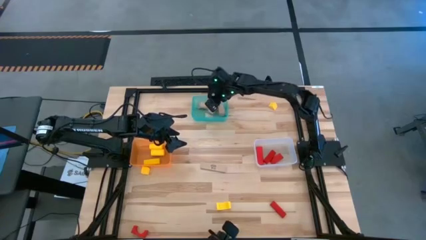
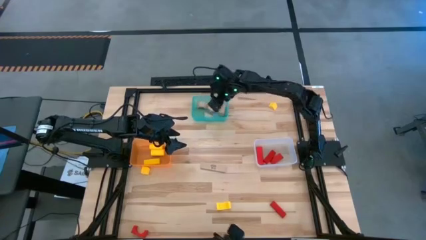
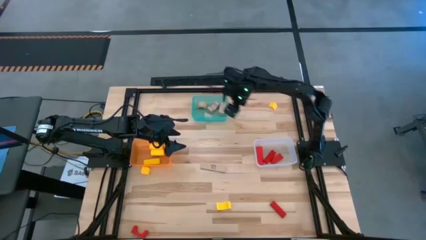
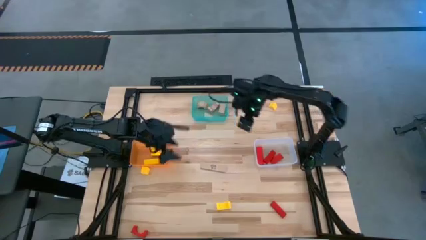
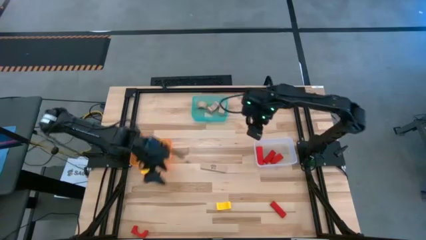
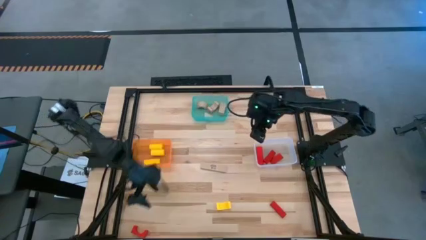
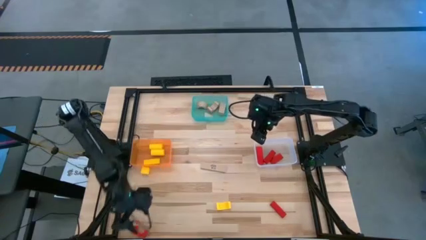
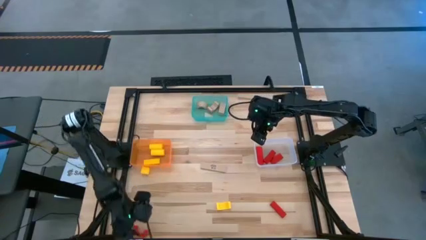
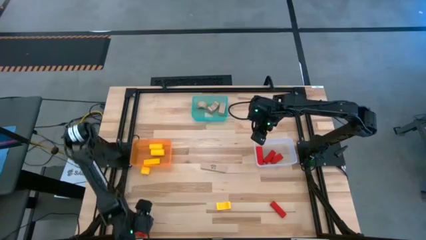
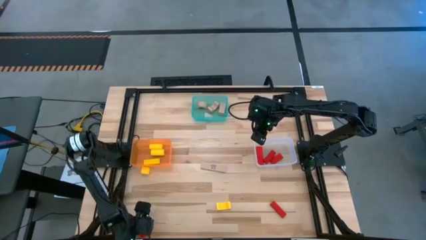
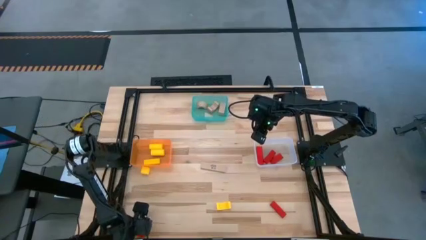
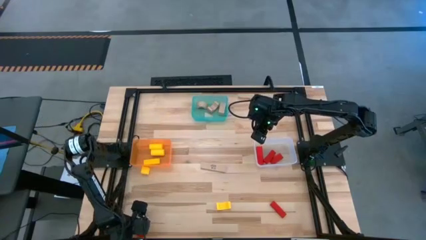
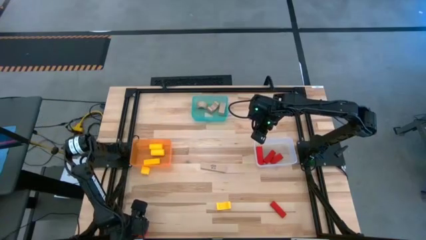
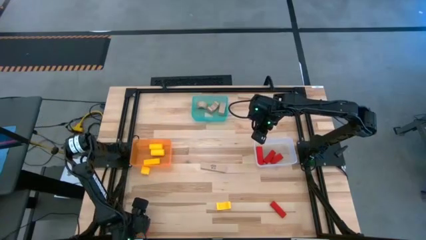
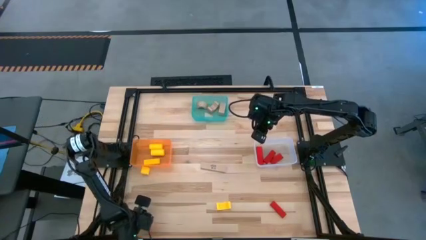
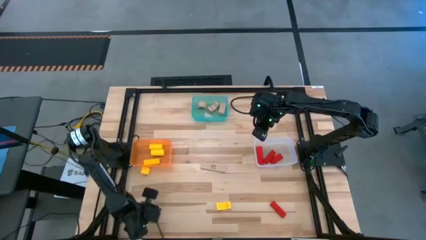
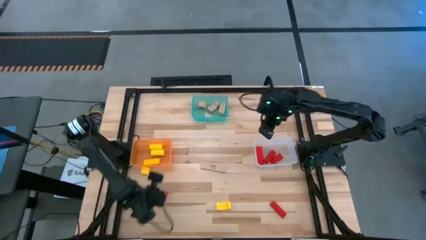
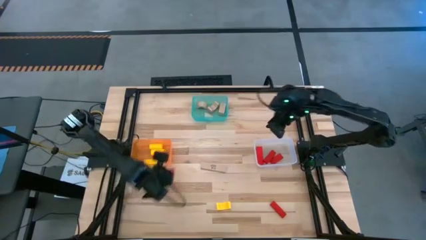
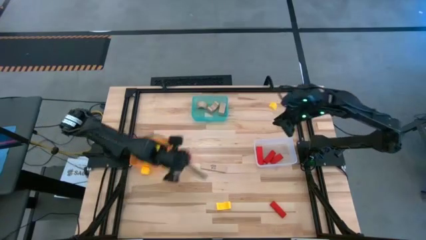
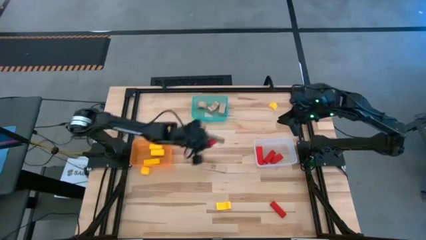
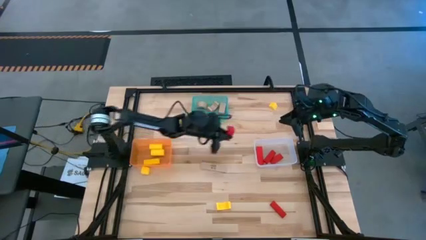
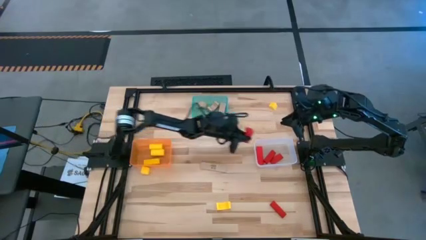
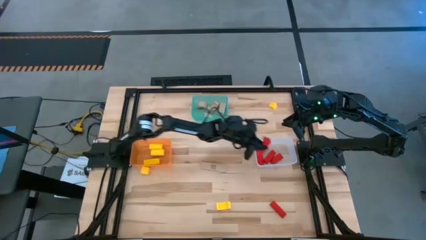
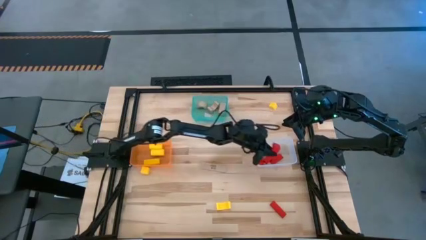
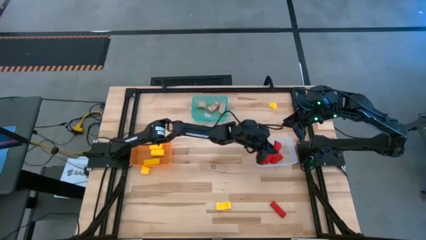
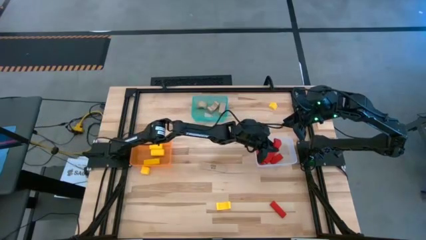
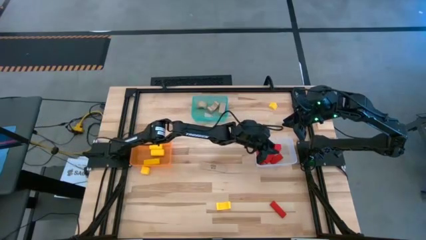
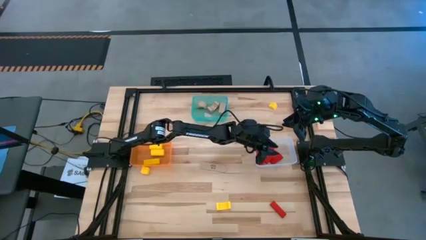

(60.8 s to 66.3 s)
Task: Sort & place blocks by color
Put the red block into the white bin

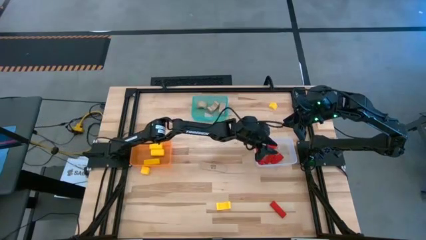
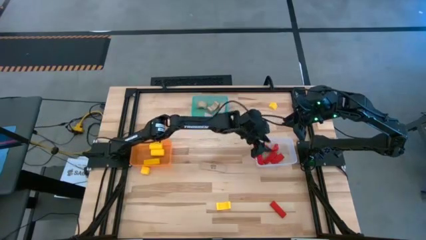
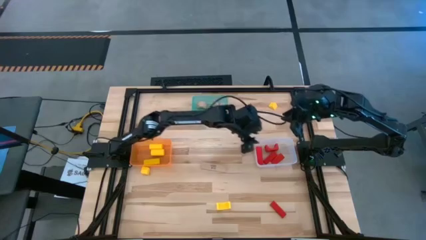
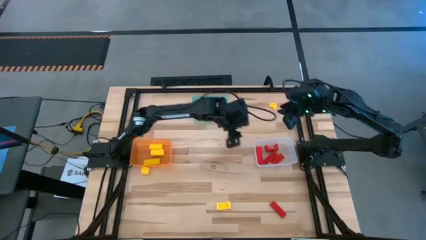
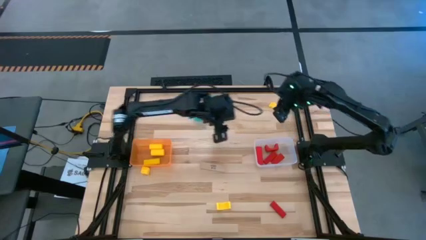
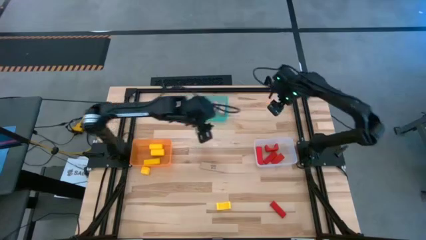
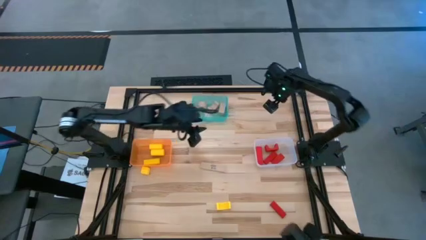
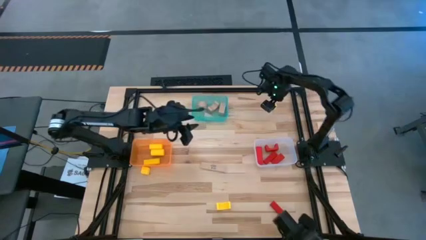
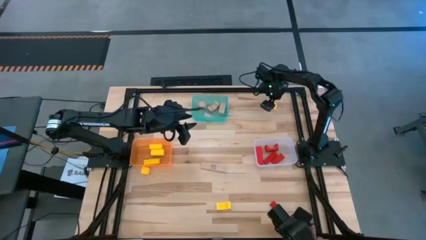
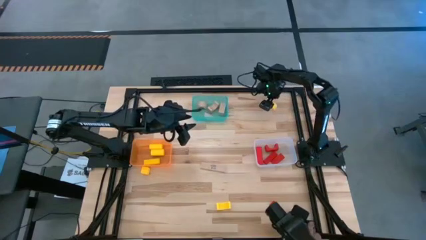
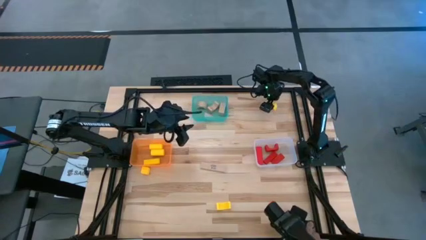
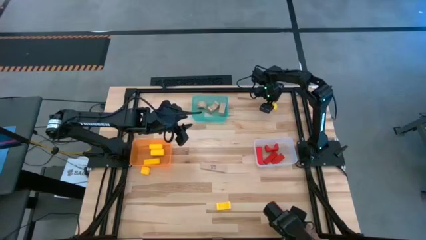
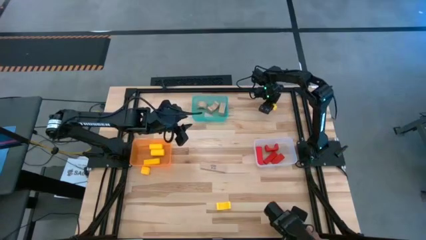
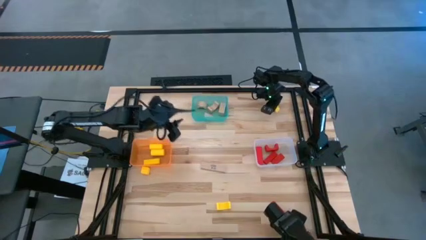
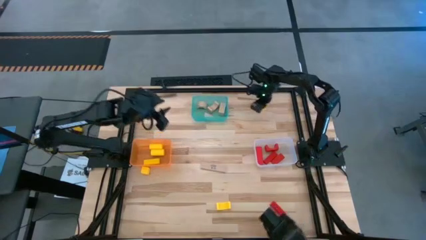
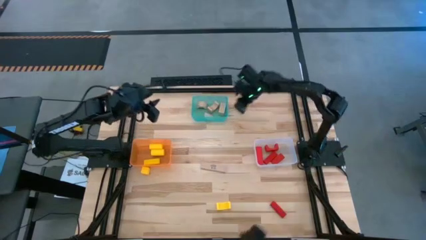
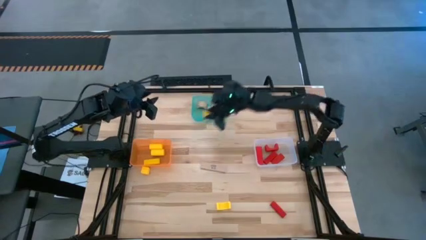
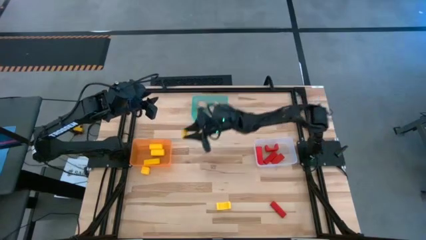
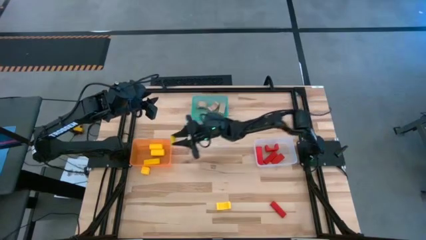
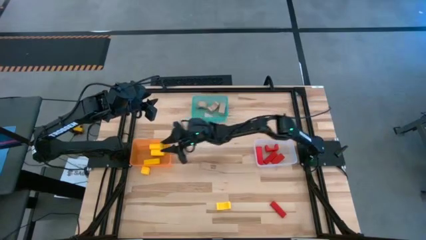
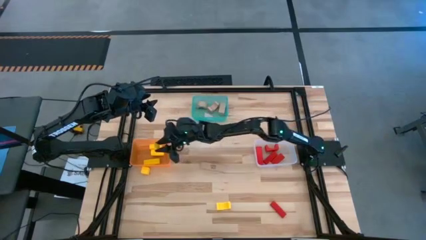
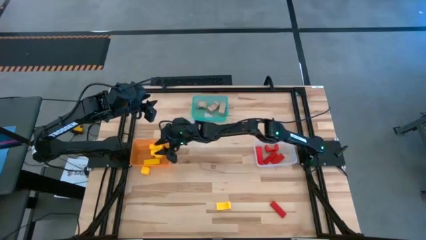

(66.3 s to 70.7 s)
Put the yellow block into the orange bin

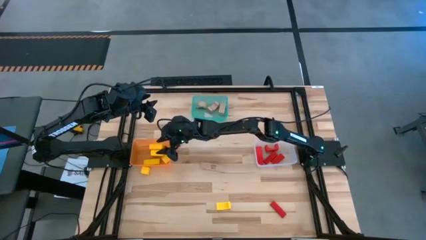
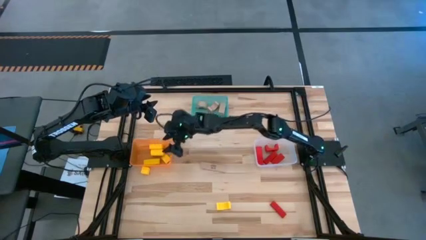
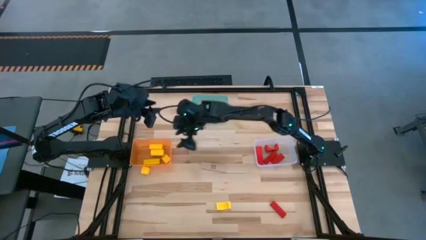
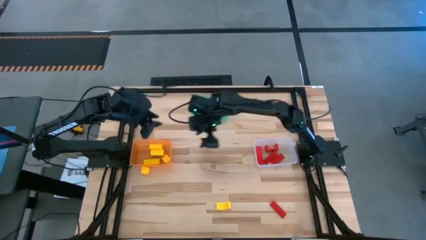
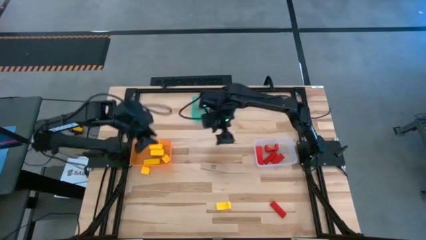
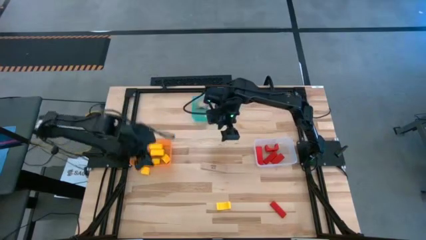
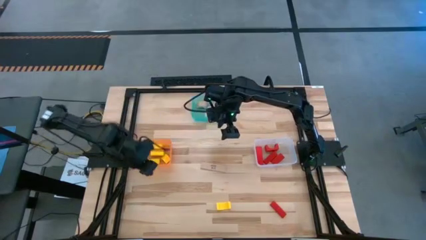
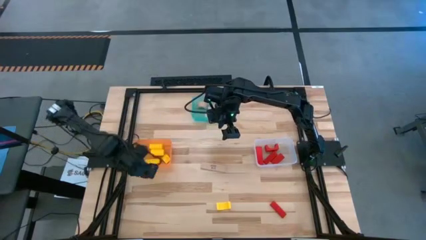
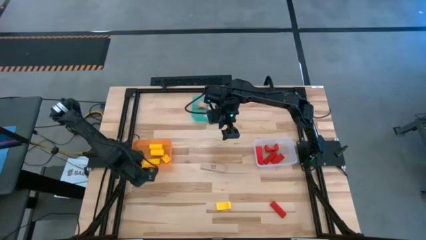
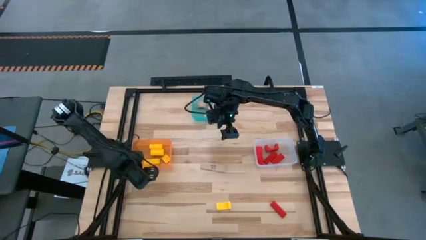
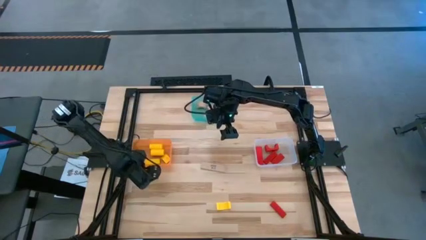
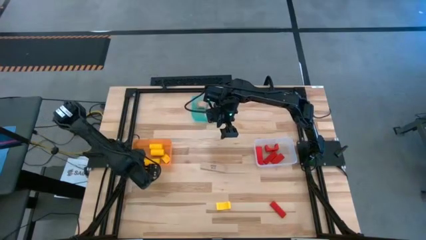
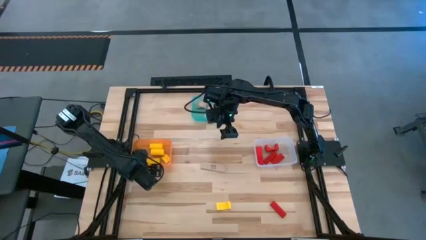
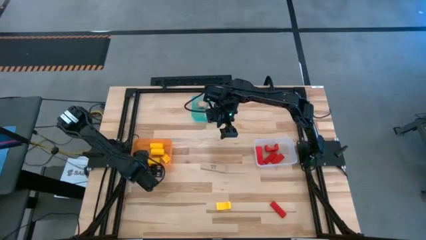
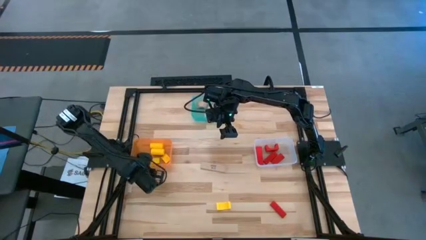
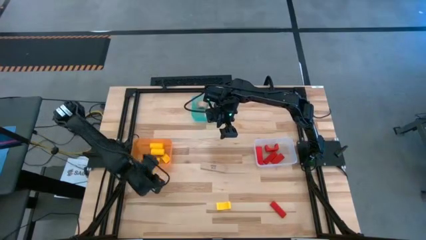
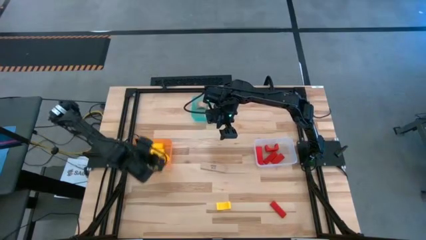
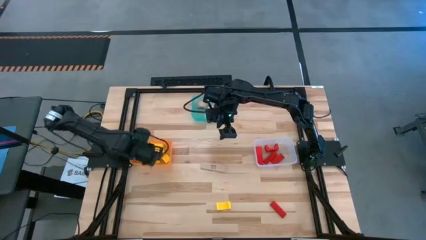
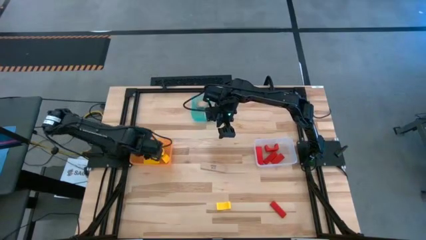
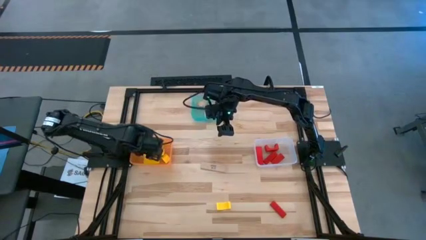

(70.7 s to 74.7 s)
Put the yellow block into the orange bin

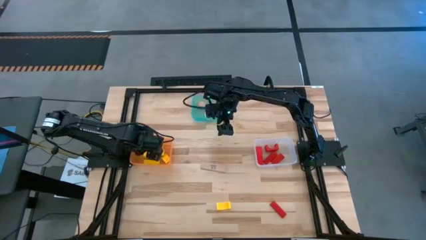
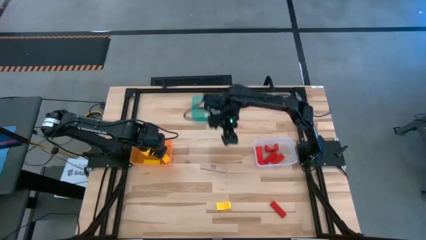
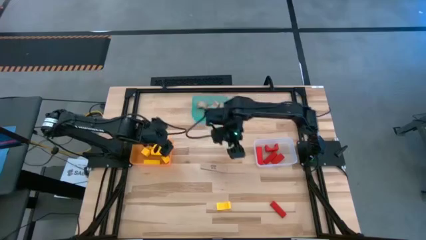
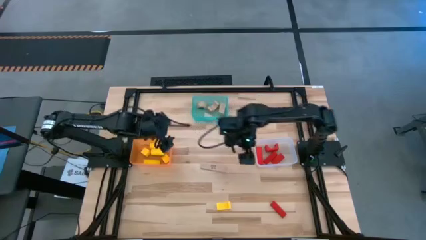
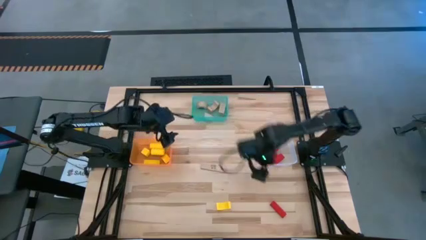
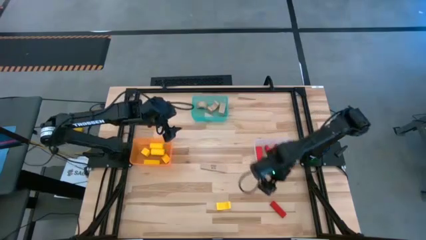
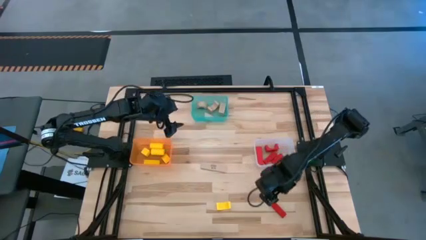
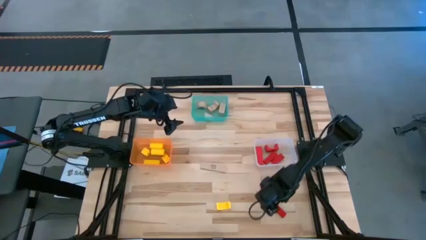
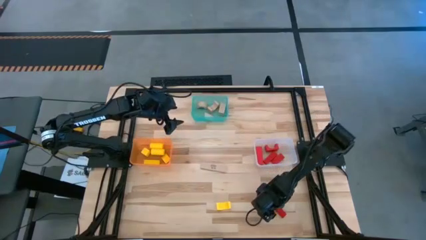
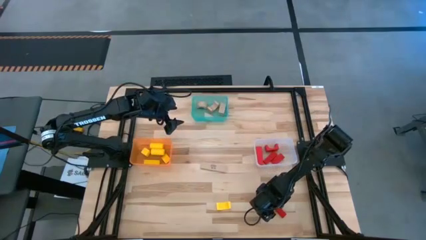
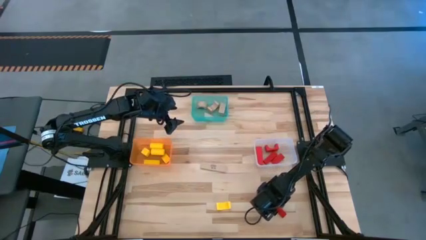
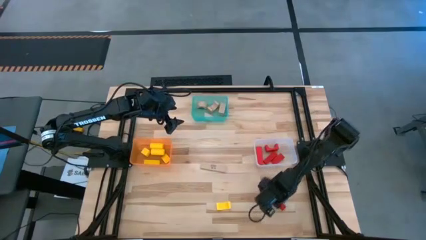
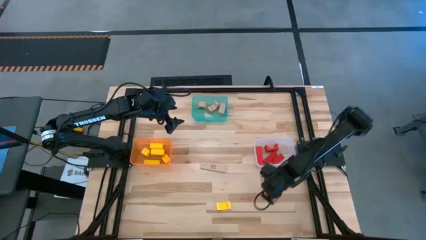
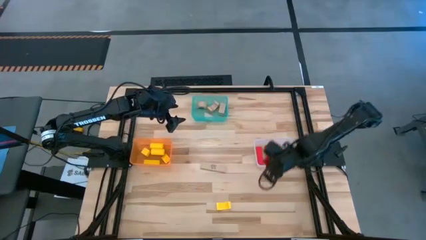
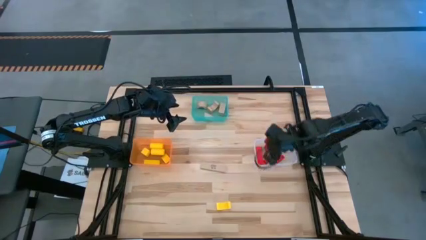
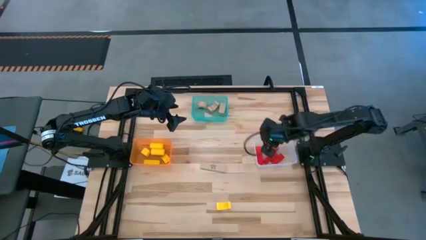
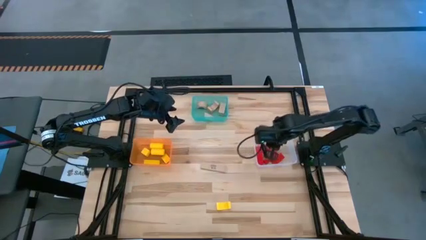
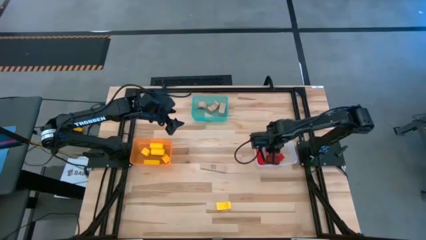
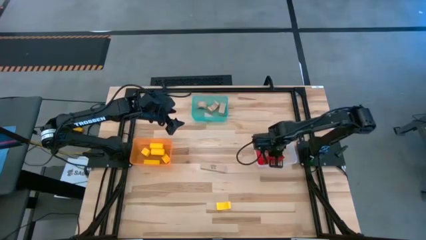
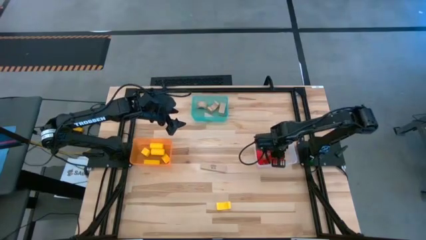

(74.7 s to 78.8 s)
Put the red block into the green bin
